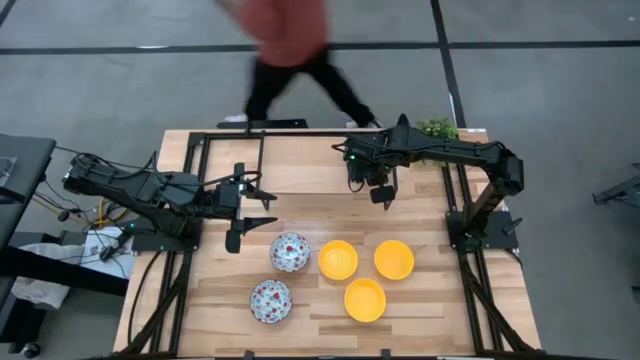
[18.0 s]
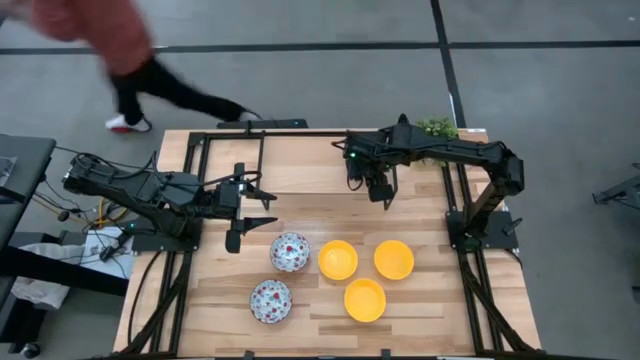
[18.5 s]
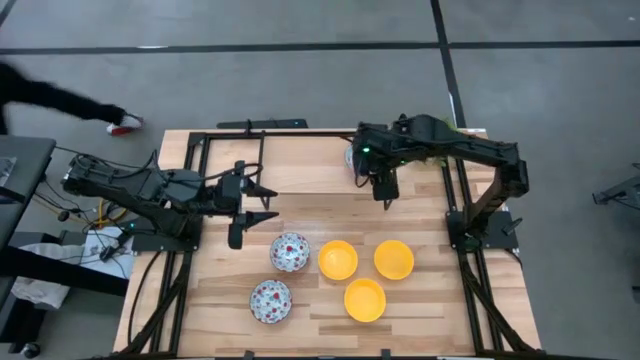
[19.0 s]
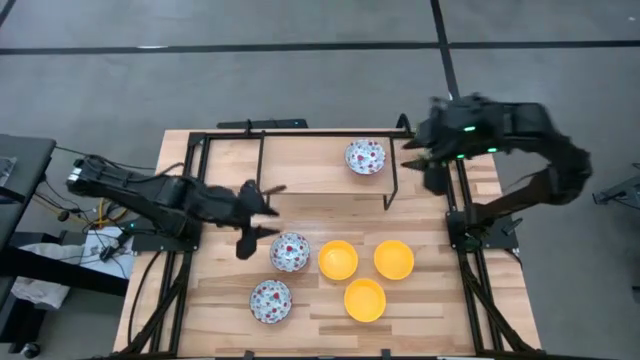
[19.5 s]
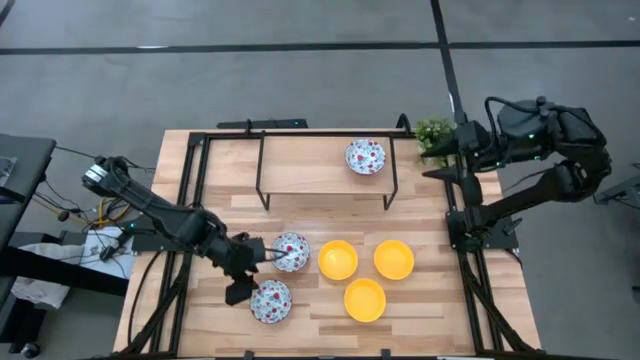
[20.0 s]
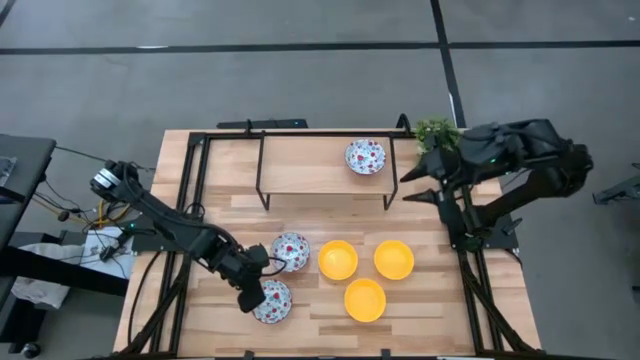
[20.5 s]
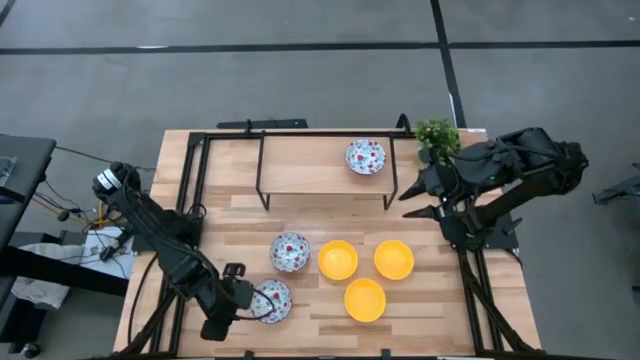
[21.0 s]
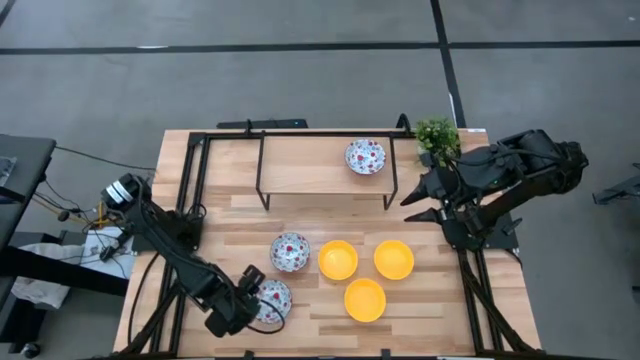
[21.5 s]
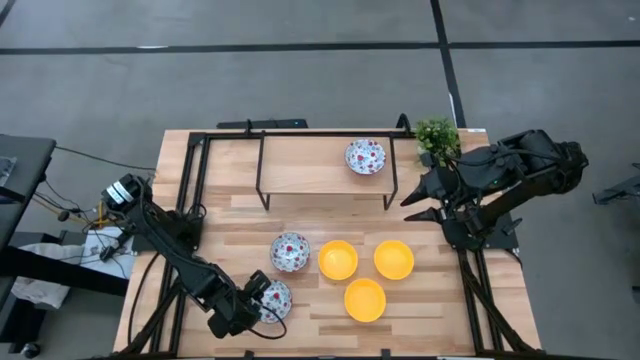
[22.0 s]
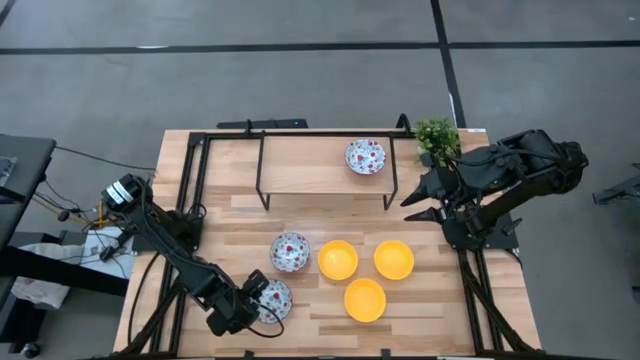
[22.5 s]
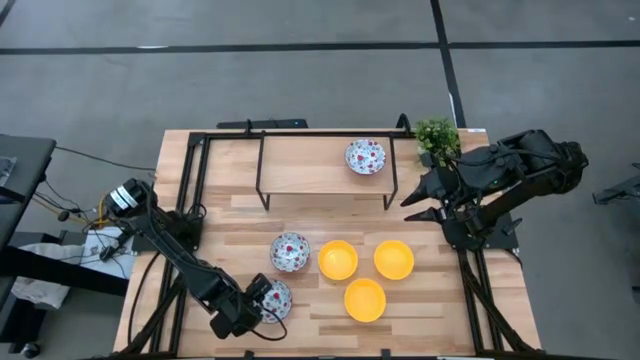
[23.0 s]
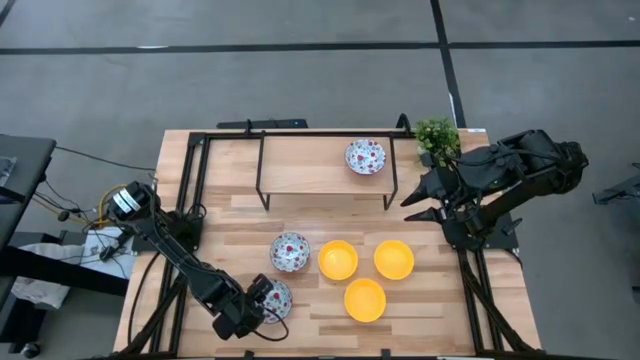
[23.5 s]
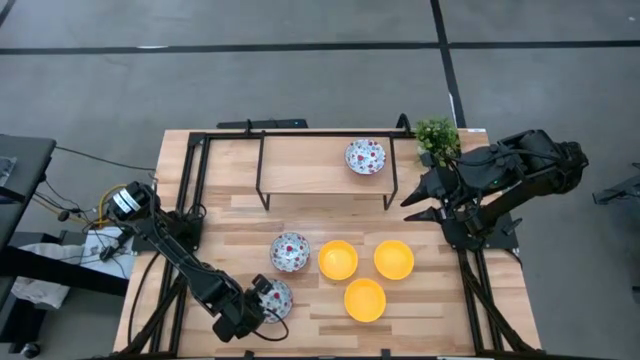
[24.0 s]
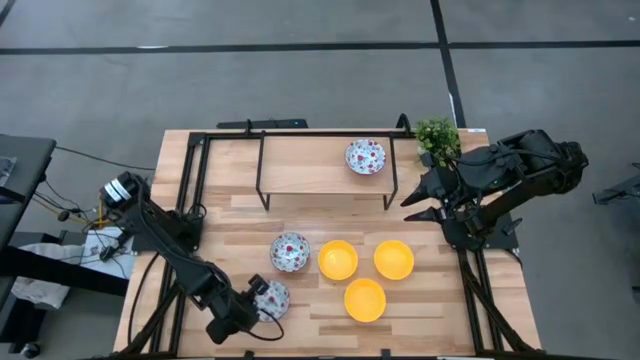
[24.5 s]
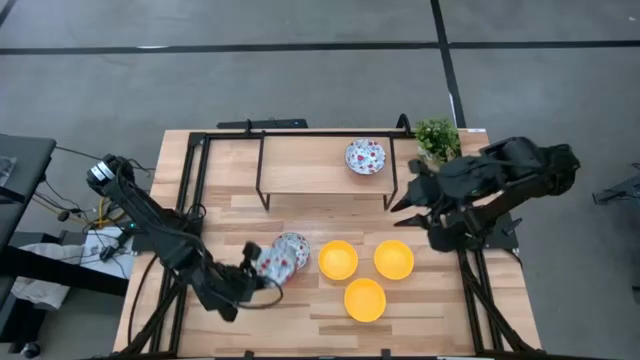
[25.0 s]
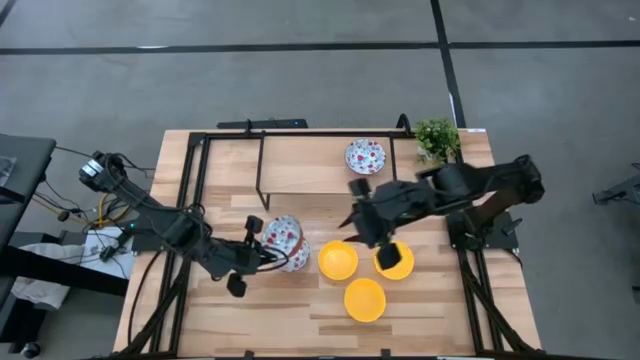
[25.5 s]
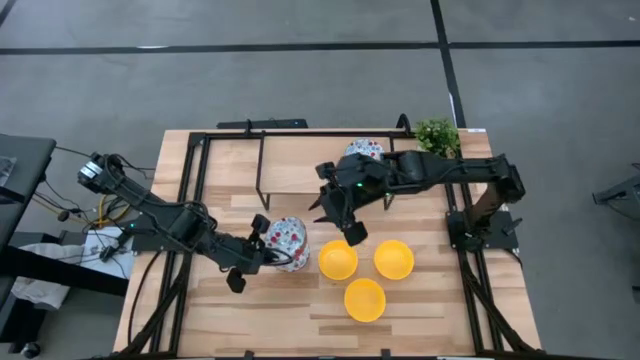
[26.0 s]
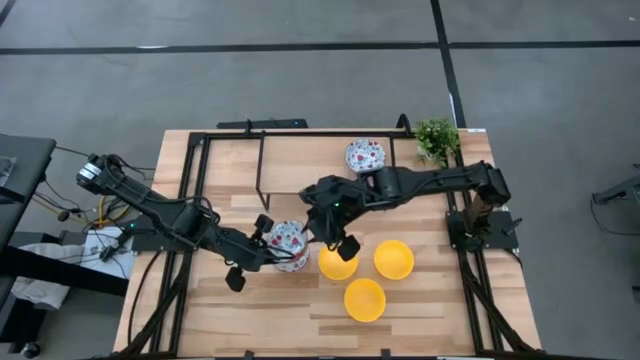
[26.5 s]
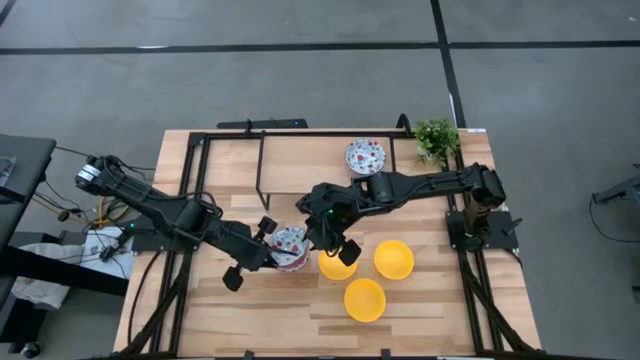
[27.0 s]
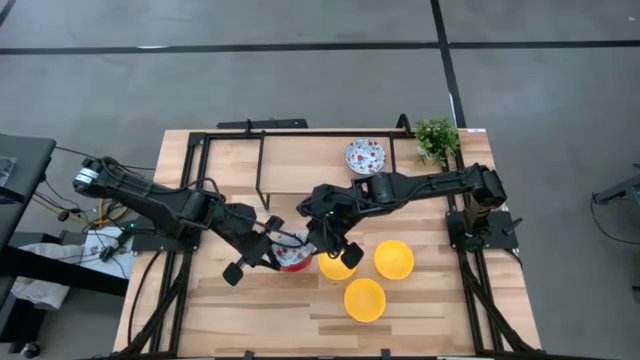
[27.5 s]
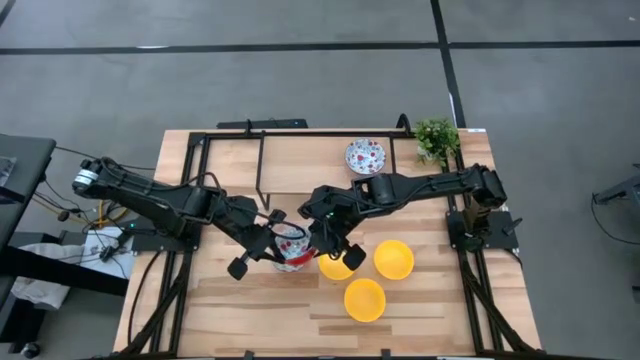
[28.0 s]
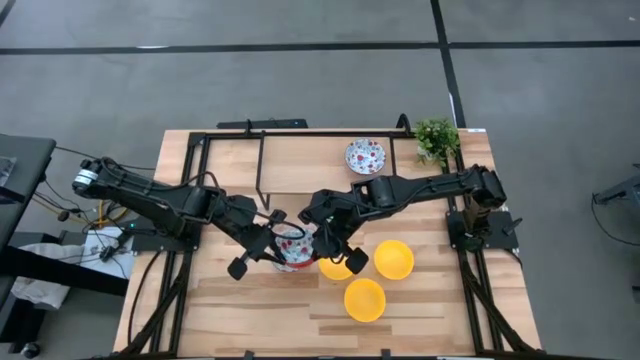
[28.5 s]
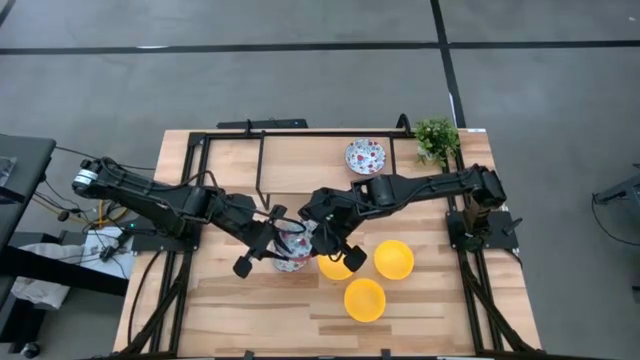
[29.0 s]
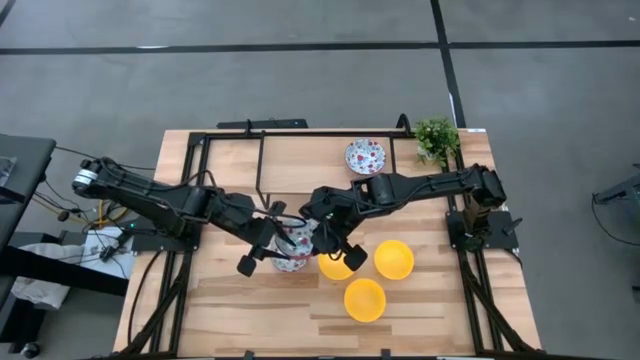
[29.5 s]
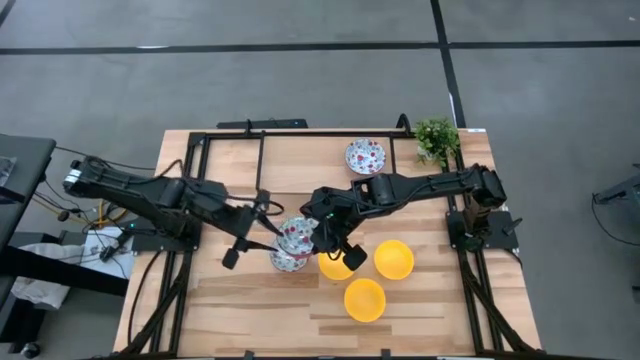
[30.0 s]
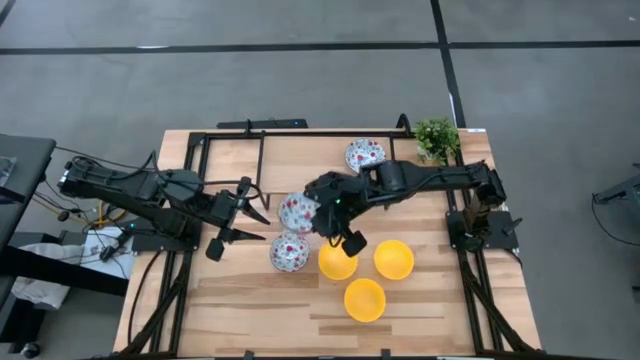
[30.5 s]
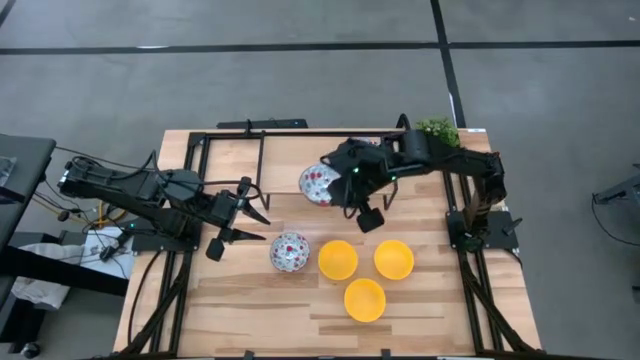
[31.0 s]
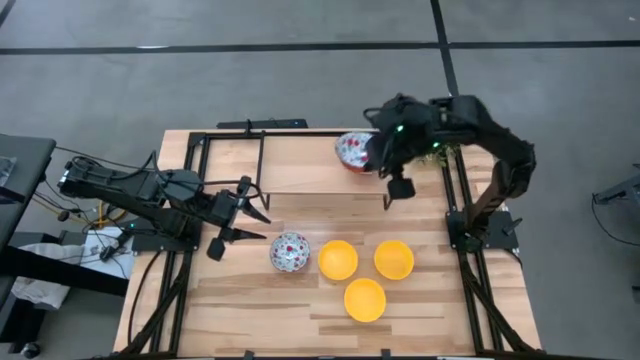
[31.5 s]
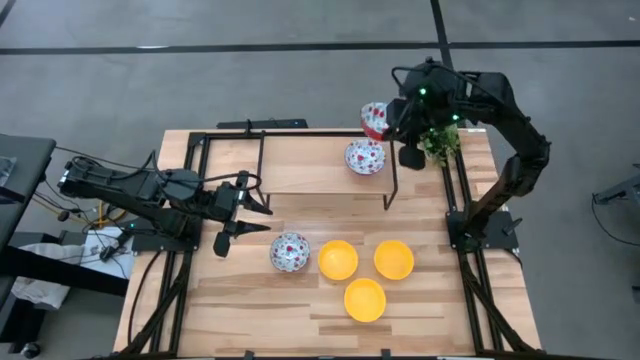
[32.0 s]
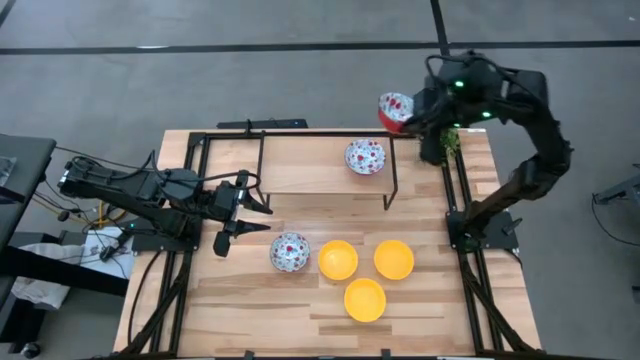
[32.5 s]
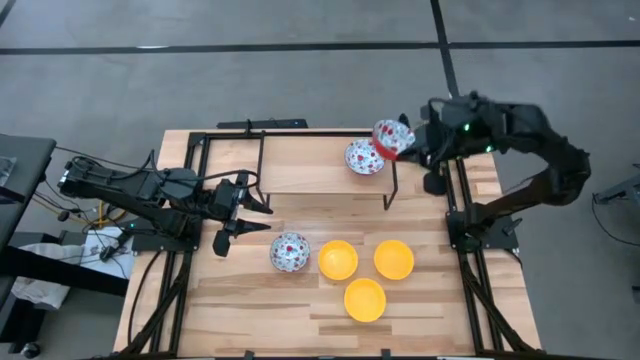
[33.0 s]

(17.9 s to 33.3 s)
Task: Pick & Place Mini bowls
Stack the bottom red patterned bowl on top of the red patterned bowl on the shelf

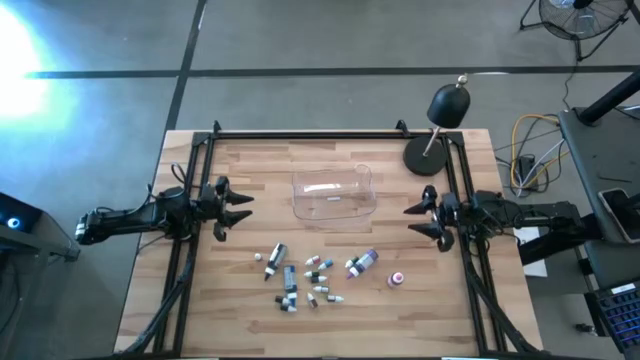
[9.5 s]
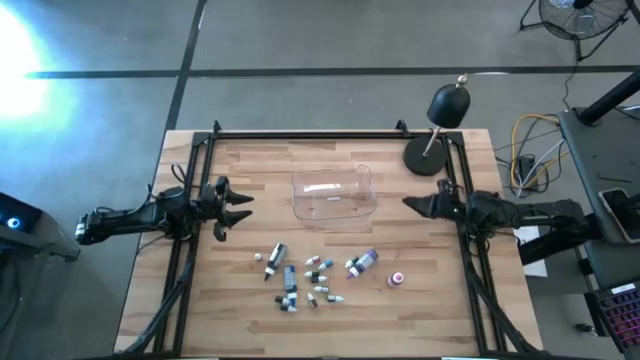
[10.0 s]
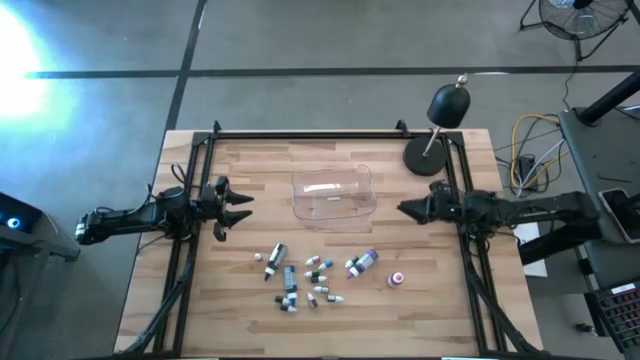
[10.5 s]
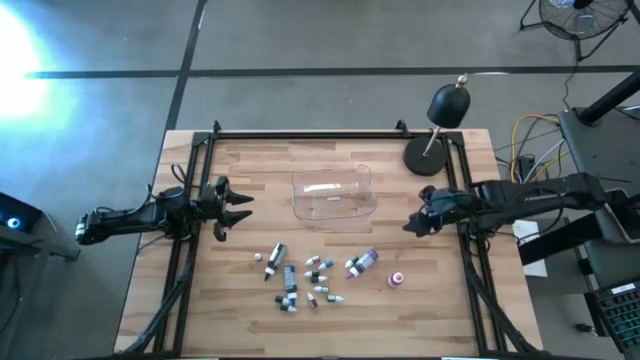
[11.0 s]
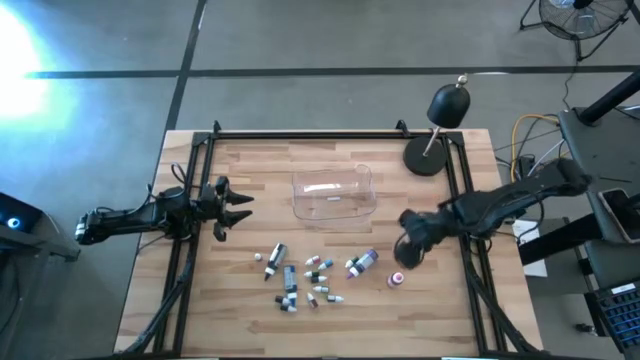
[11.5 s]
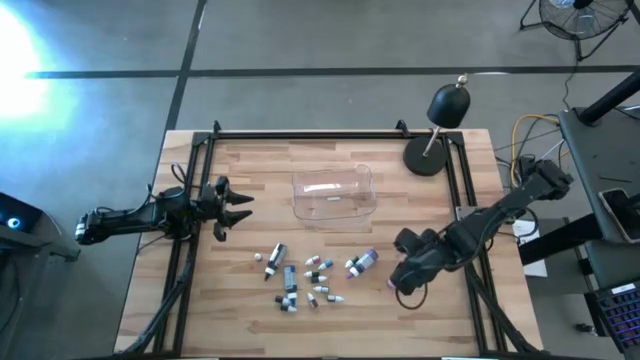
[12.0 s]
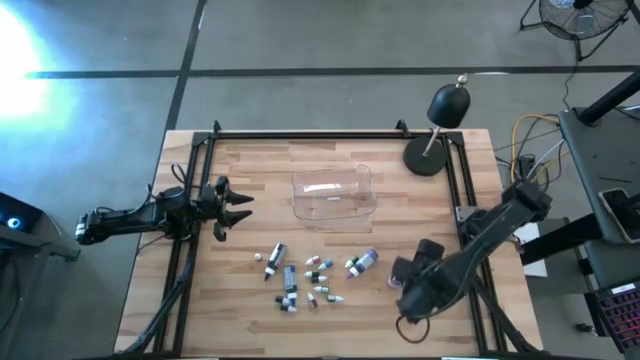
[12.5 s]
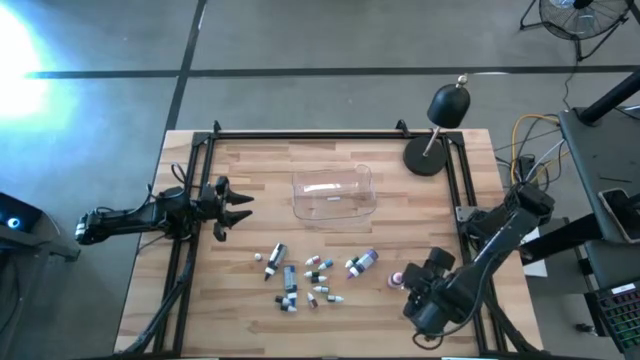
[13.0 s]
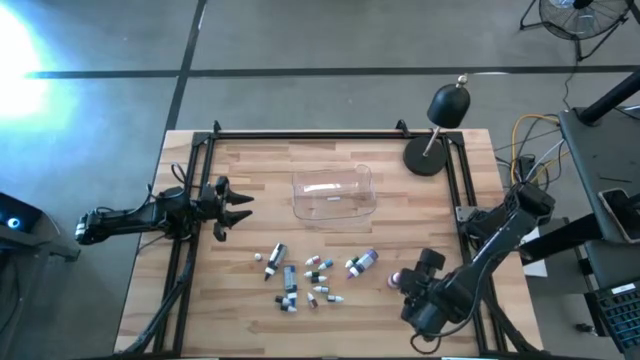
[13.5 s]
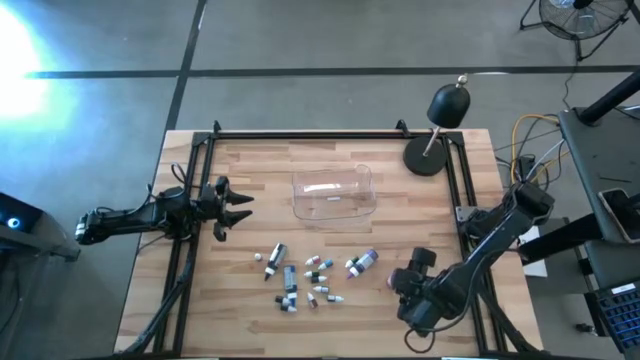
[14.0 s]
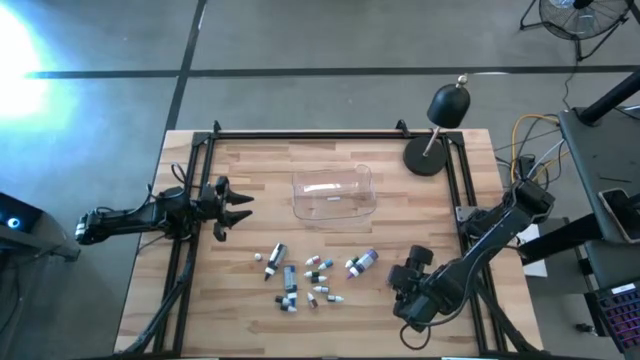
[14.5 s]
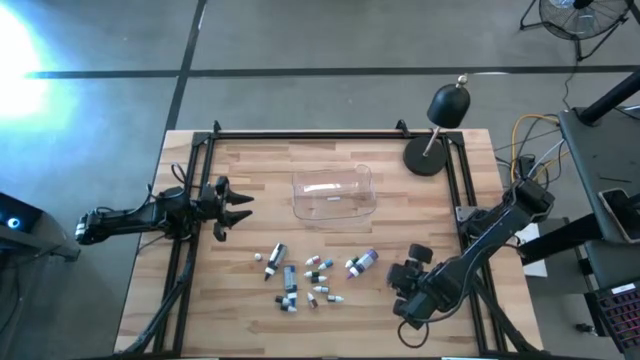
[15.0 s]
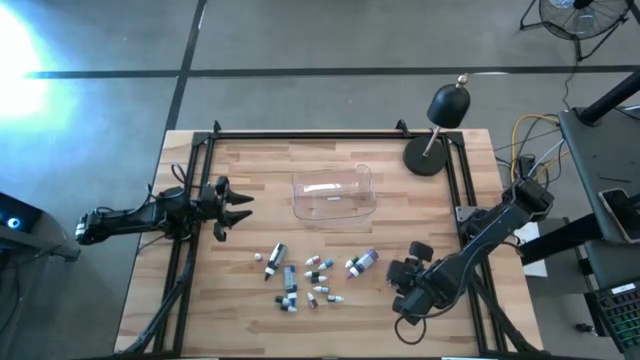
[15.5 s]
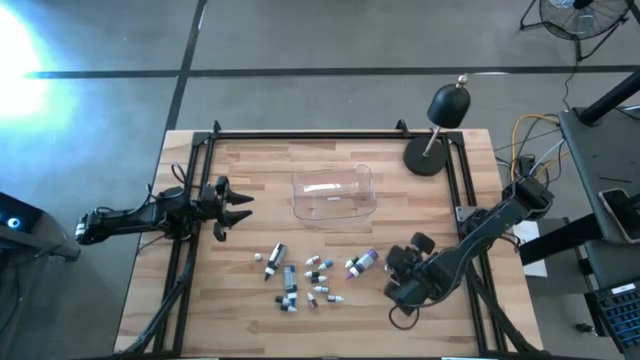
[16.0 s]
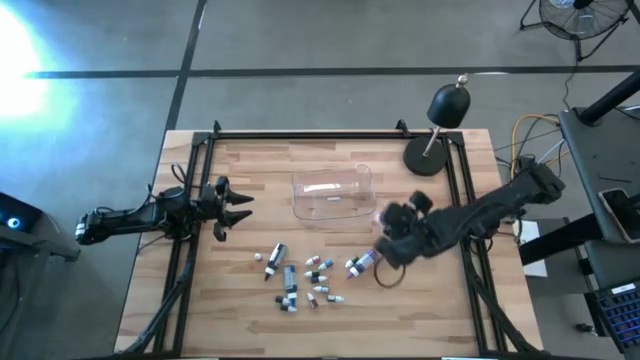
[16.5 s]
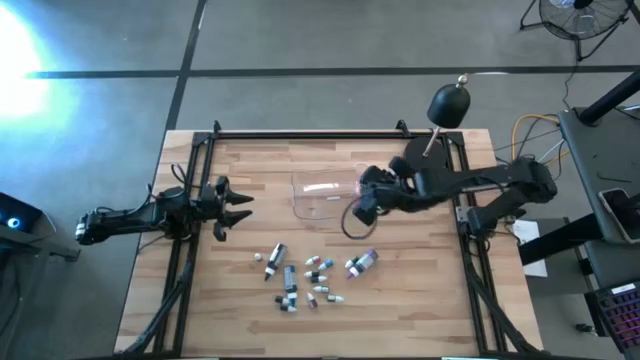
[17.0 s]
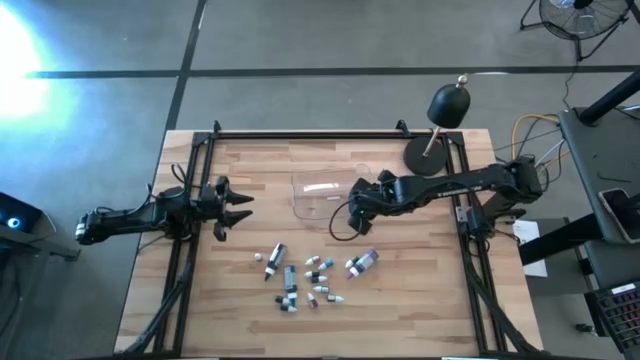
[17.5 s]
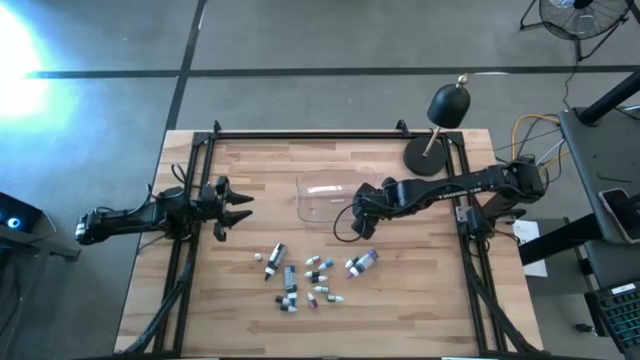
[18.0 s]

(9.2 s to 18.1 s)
Task: Pick & Place food coloring
Put the large pink food coloring bottle into the transparent bin
